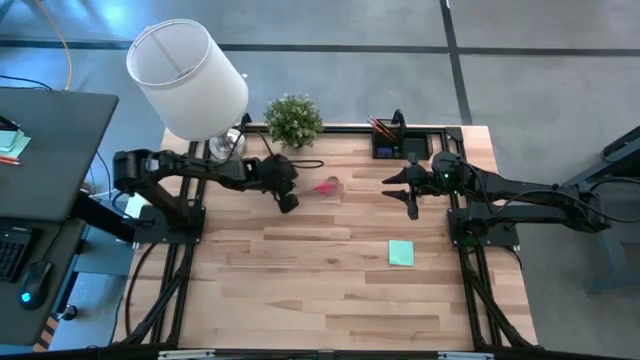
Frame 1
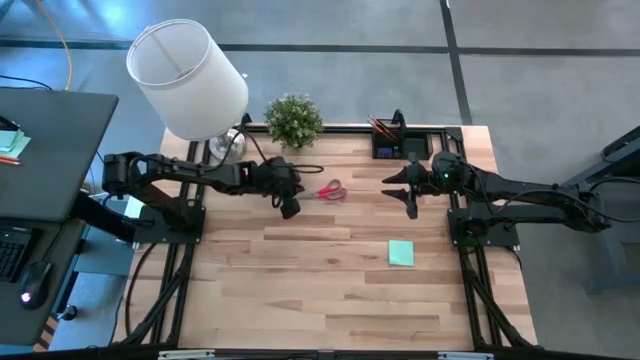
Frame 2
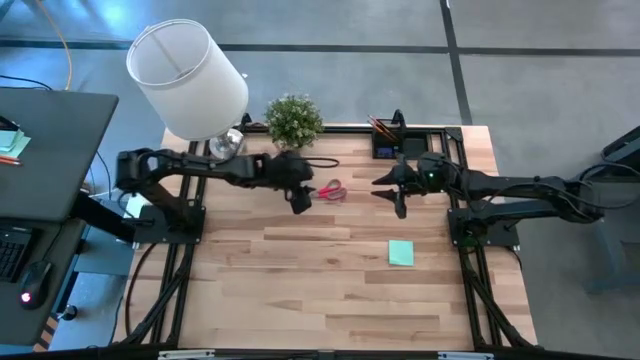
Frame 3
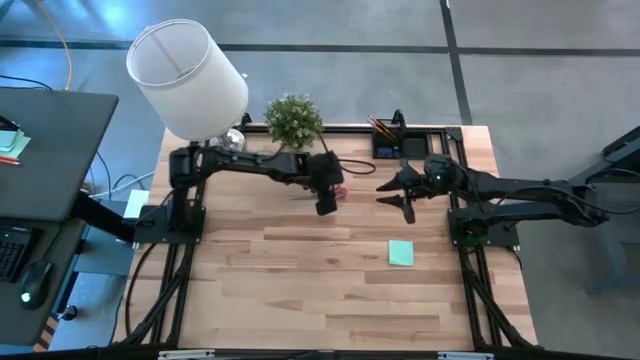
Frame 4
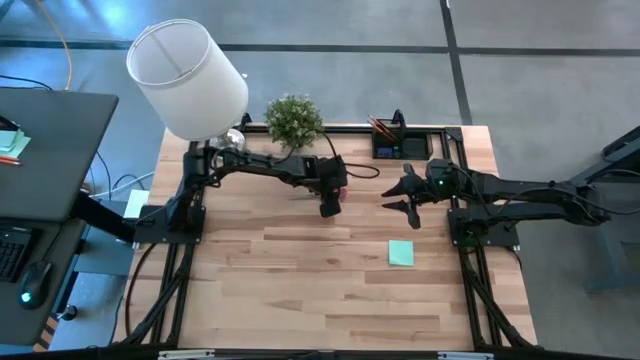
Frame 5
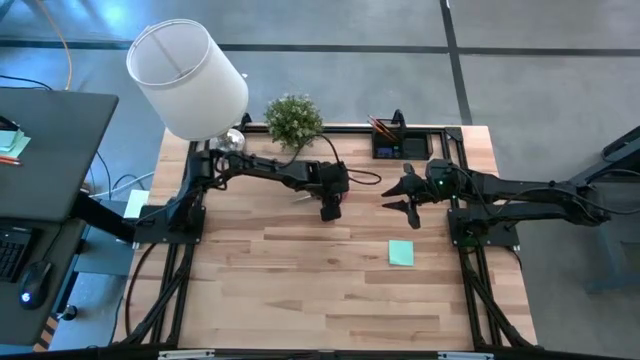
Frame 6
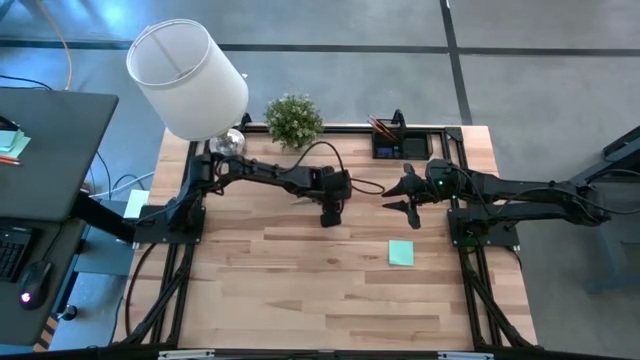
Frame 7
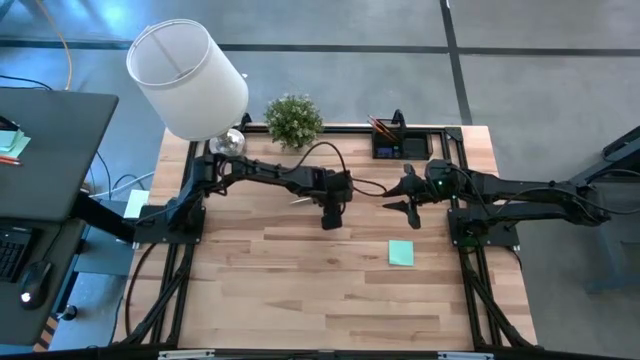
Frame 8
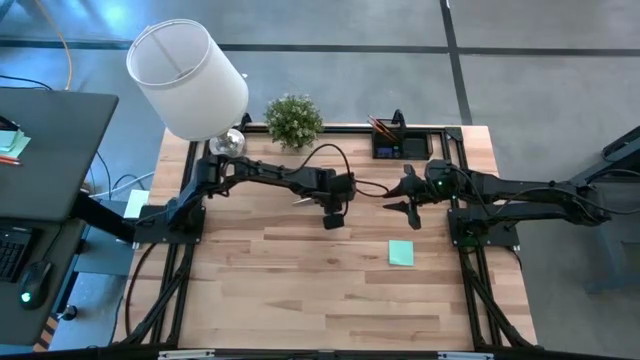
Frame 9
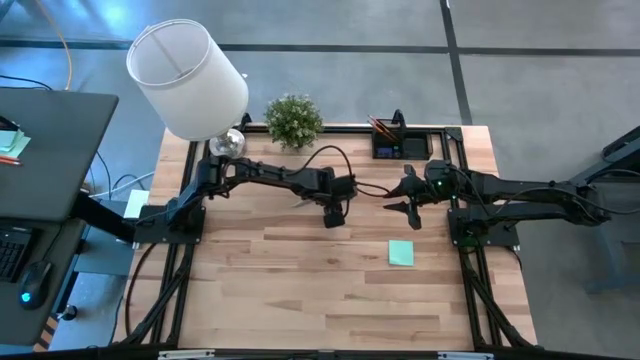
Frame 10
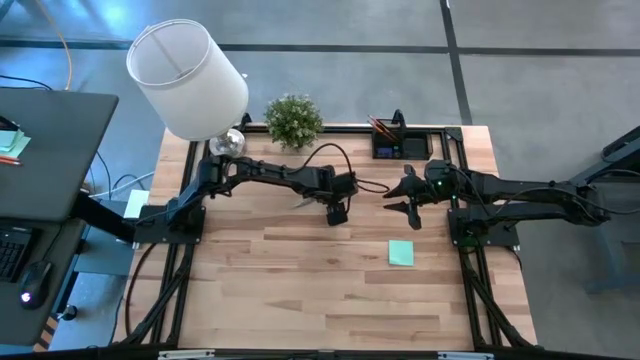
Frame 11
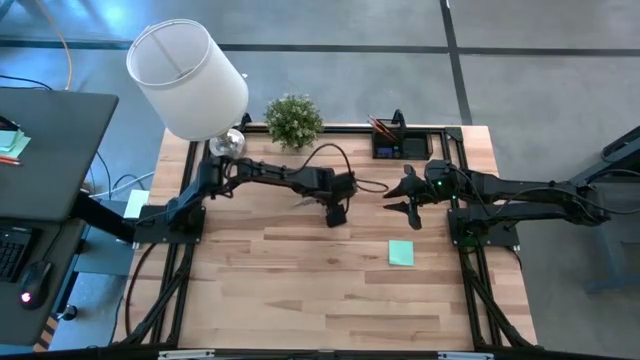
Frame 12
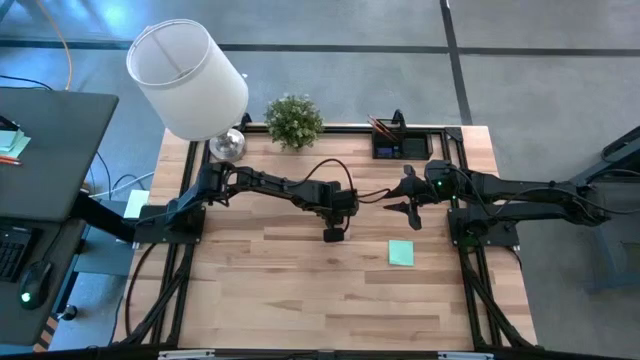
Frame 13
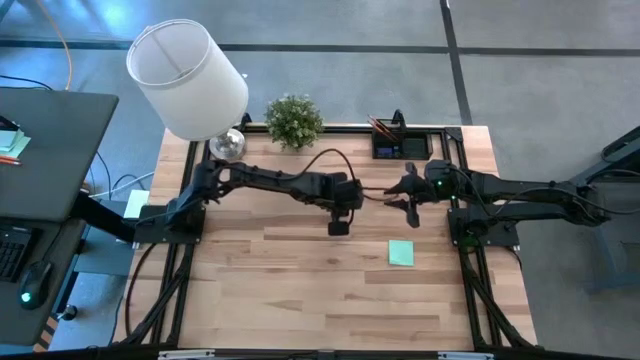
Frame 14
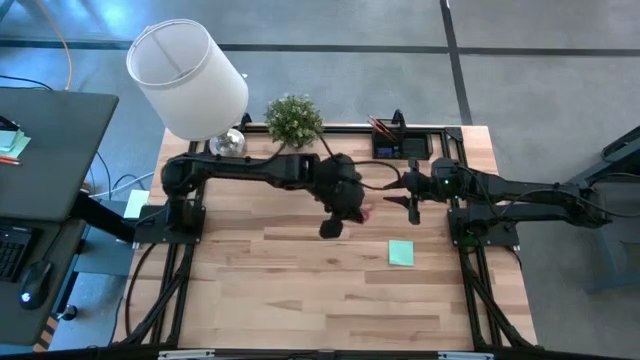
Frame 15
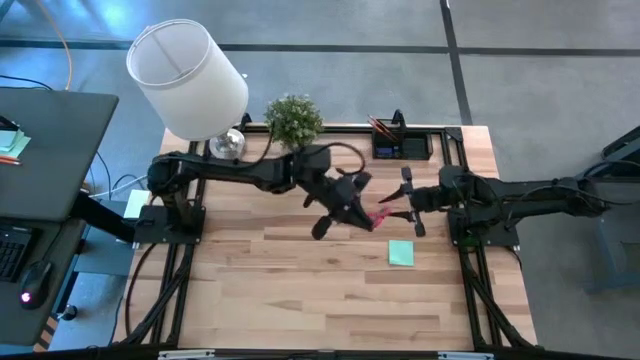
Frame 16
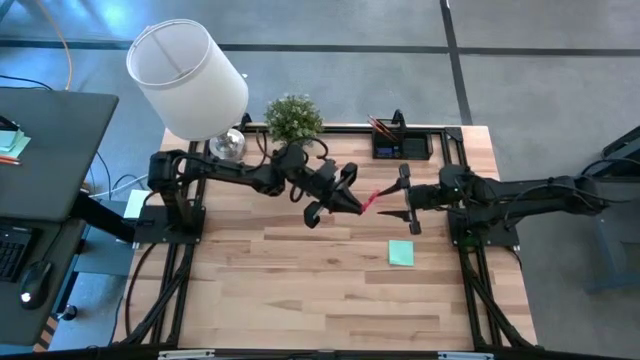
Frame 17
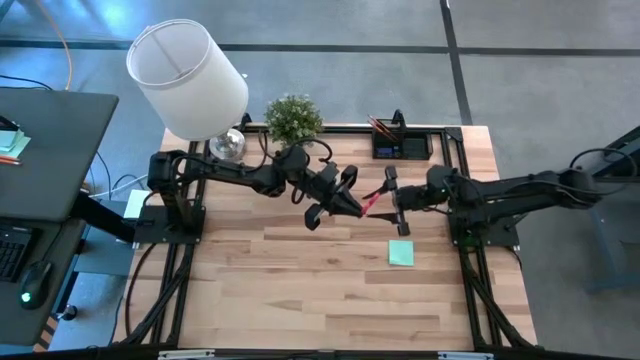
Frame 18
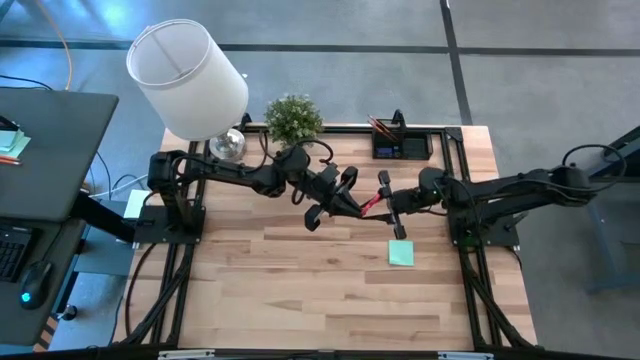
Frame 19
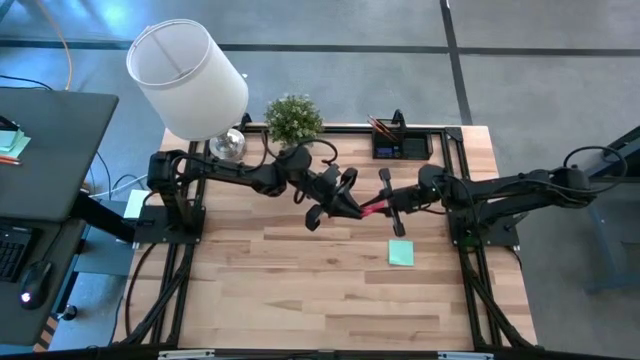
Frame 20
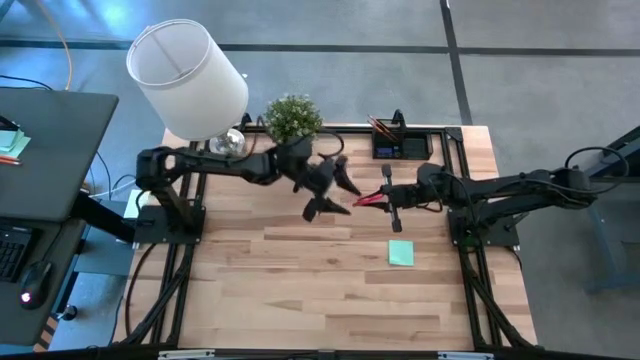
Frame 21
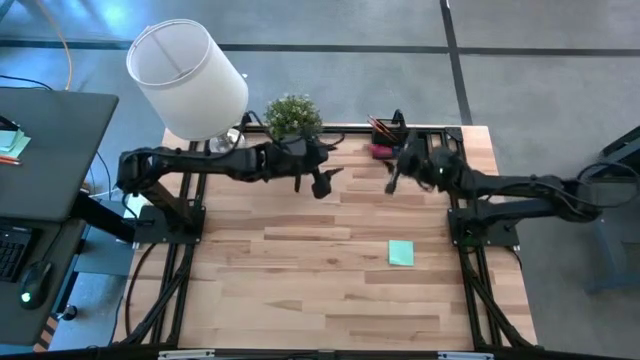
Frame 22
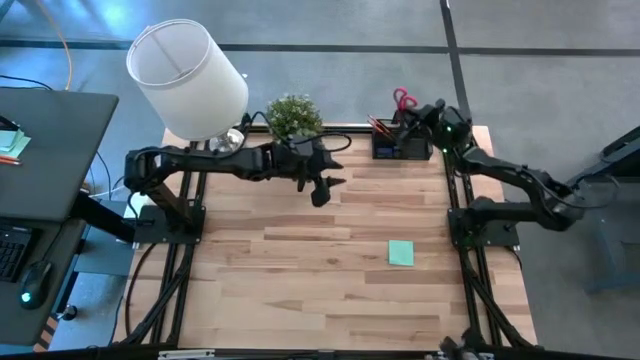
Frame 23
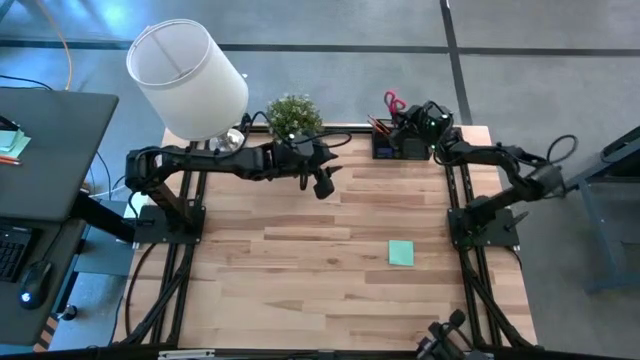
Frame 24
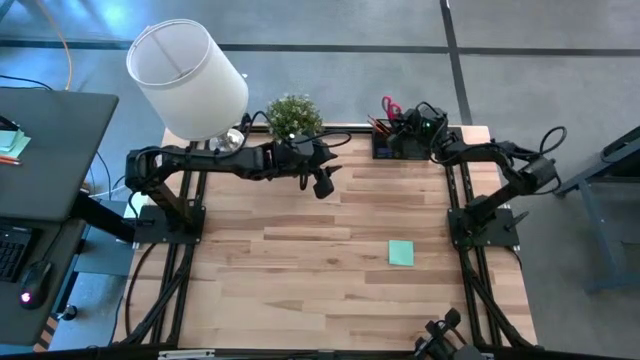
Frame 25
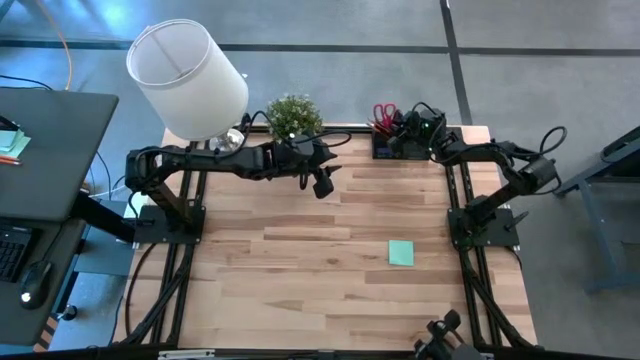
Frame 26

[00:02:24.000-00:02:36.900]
Task: Pick and place office supplies into organizer
Put the red scissor in the black desk organizer

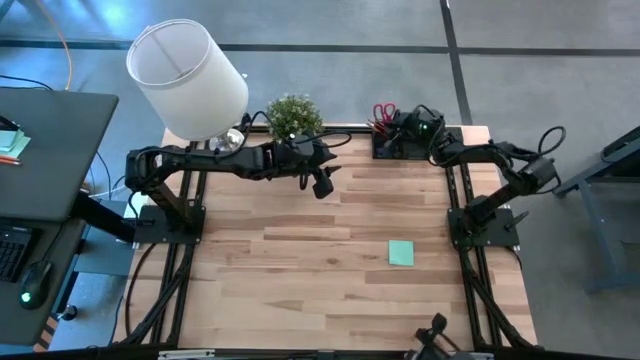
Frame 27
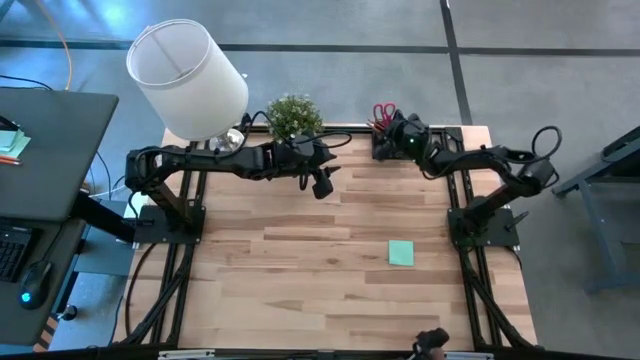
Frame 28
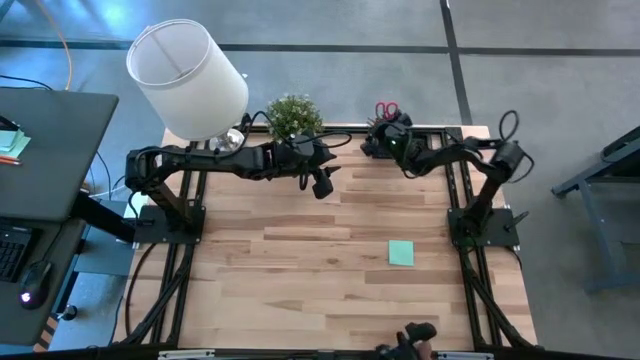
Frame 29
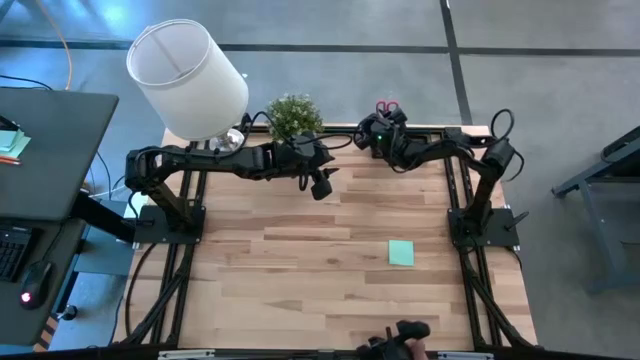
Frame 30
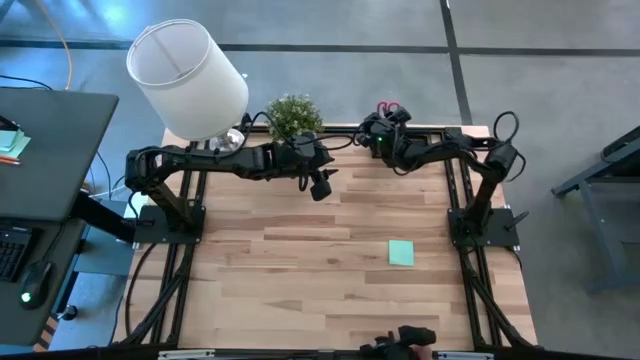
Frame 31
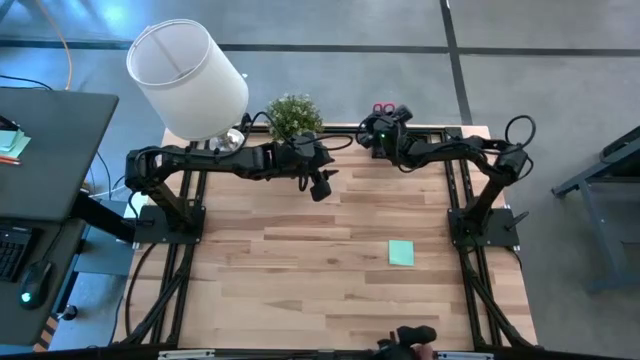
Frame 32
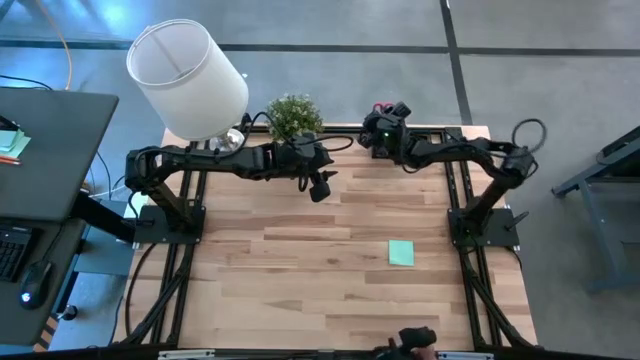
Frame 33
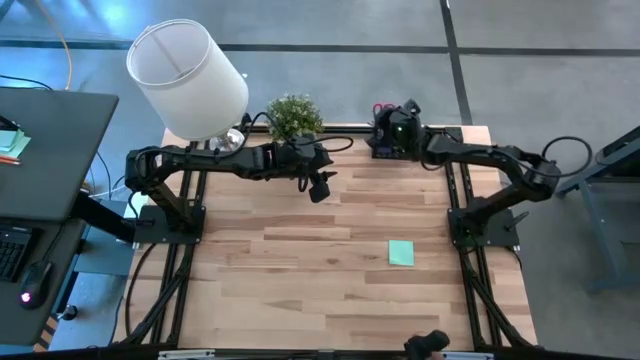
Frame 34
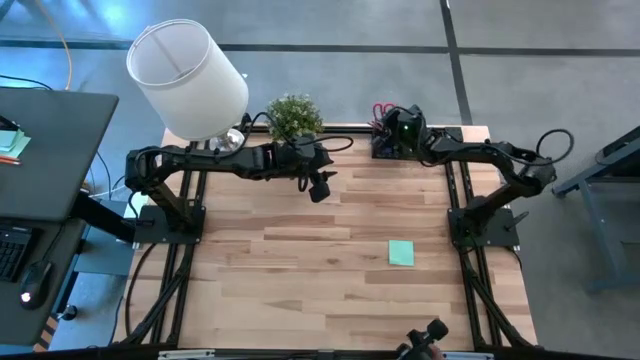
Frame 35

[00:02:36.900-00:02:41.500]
Adjust the office supplies in the black desk organizer

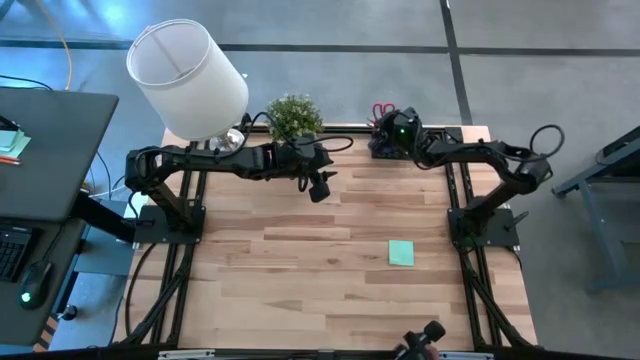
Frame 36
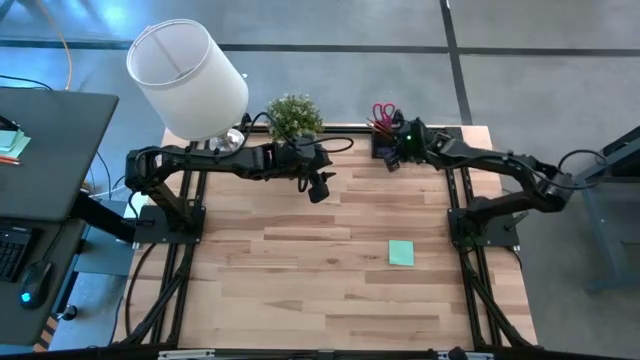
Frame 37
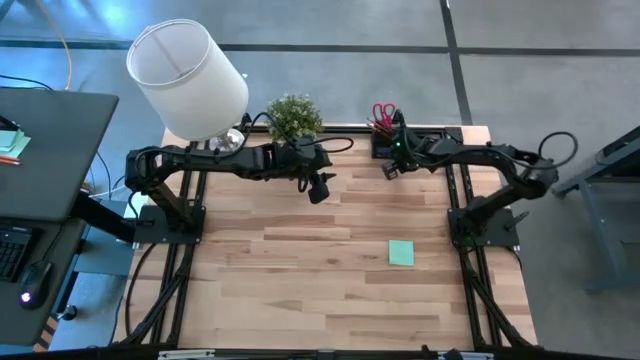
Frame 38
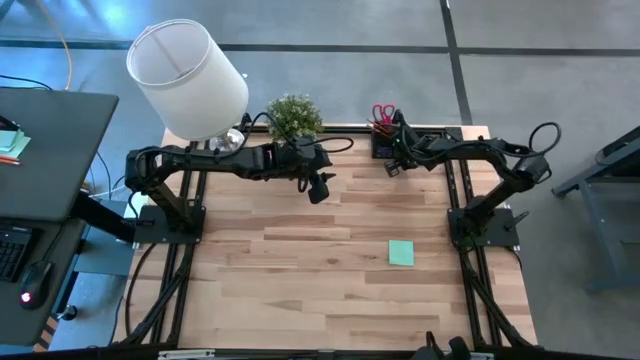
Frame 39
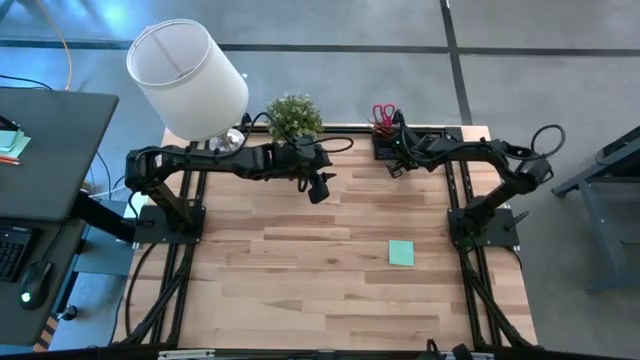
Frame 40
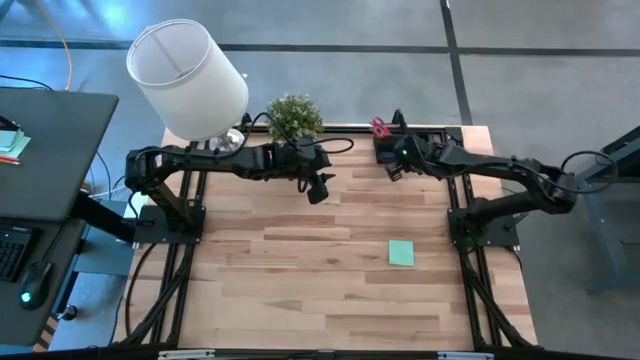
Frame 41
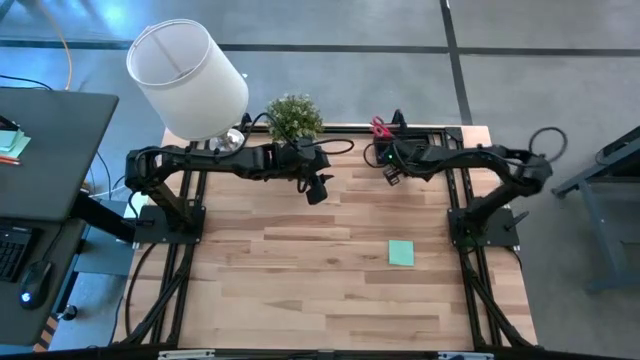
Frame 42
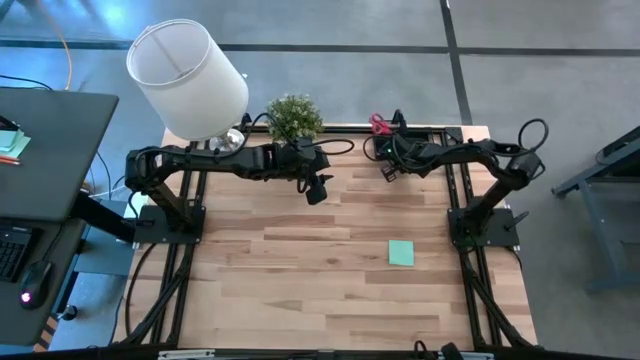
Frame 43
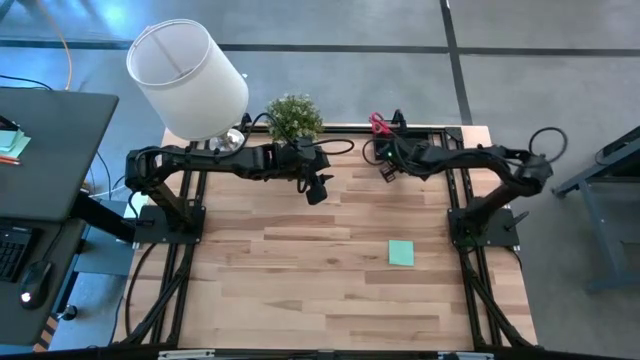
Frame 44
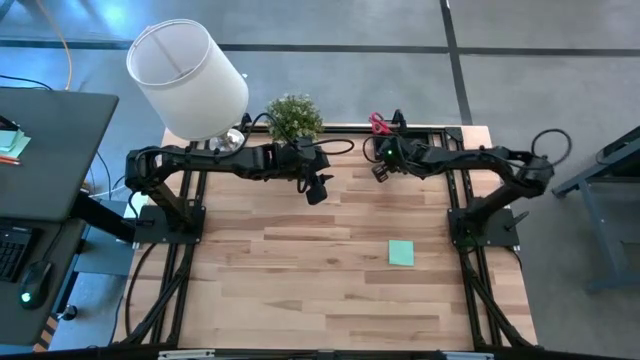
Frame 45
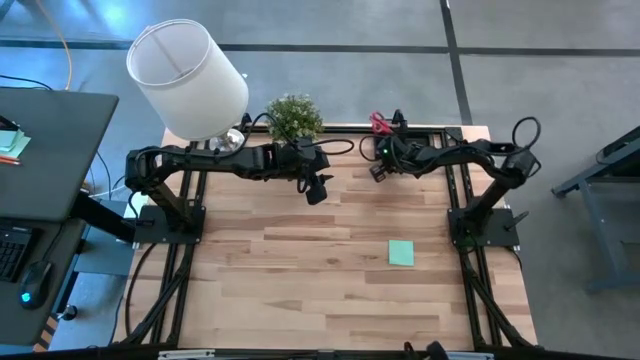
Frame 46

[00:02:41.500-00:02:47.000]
Adjust the black desk organizer
